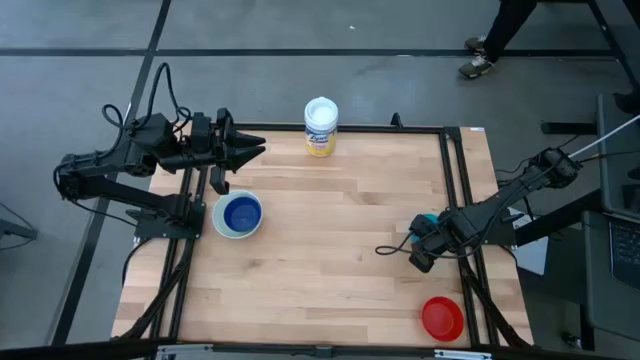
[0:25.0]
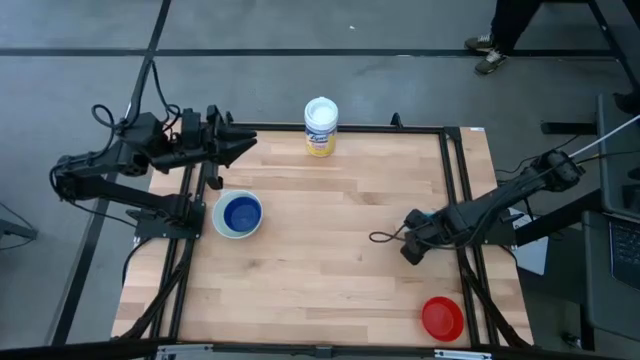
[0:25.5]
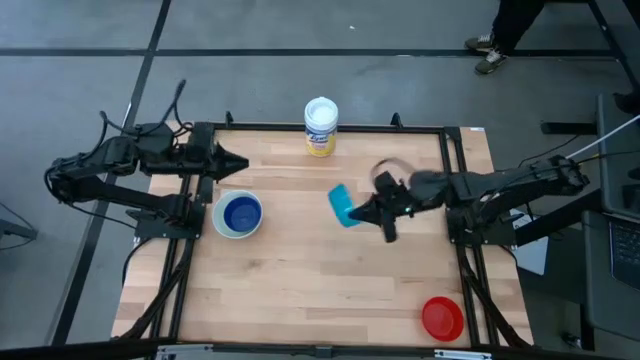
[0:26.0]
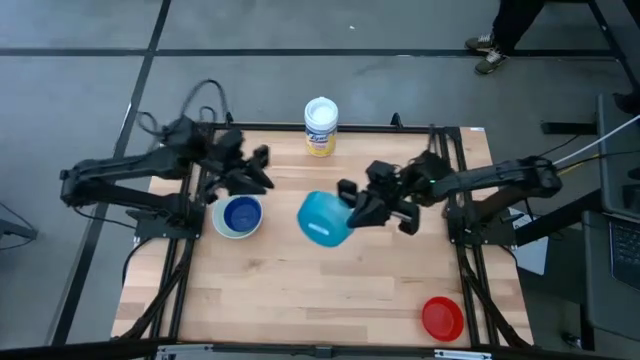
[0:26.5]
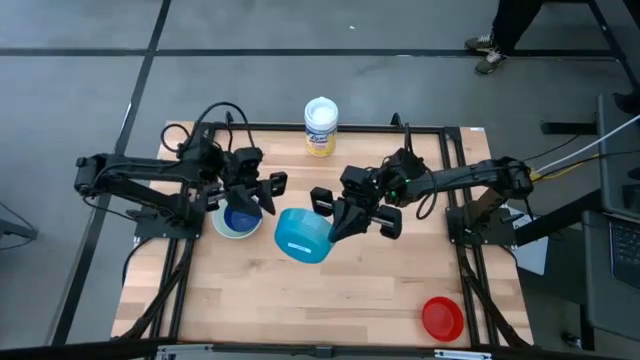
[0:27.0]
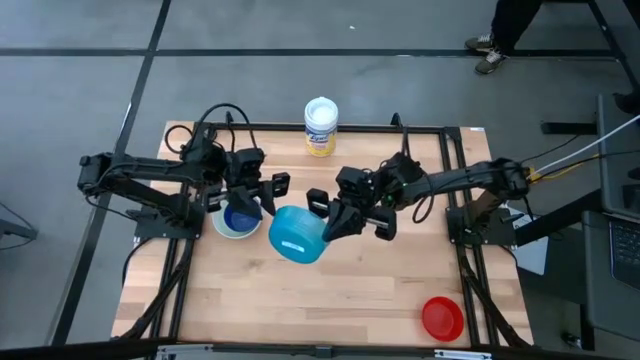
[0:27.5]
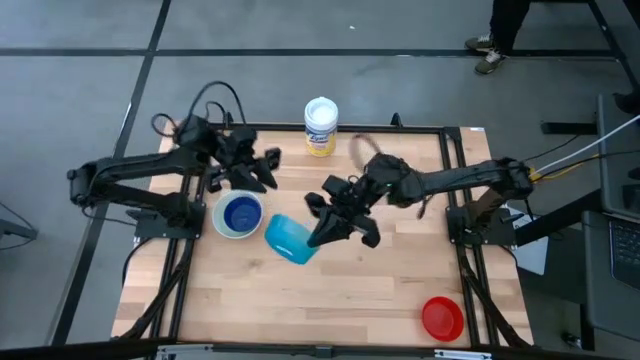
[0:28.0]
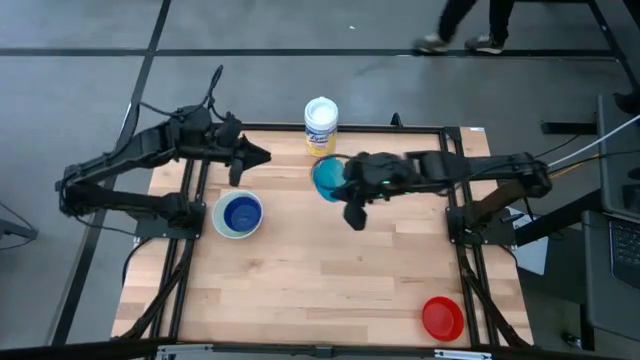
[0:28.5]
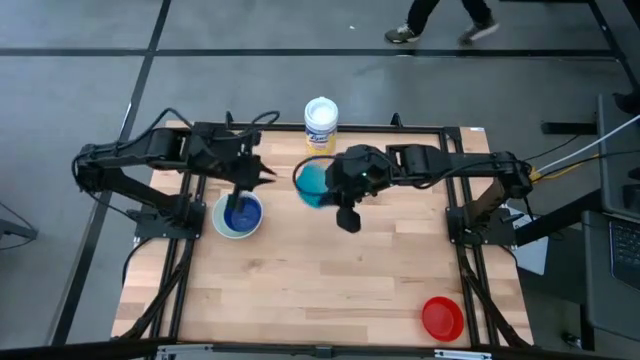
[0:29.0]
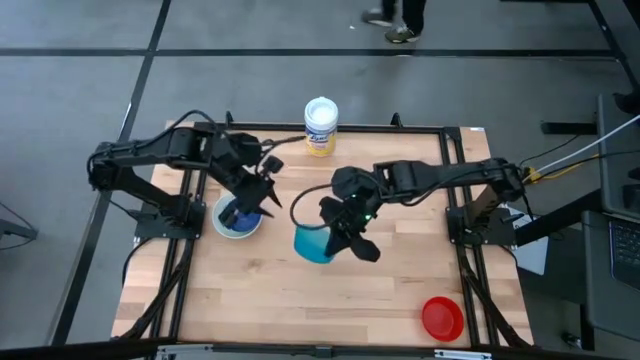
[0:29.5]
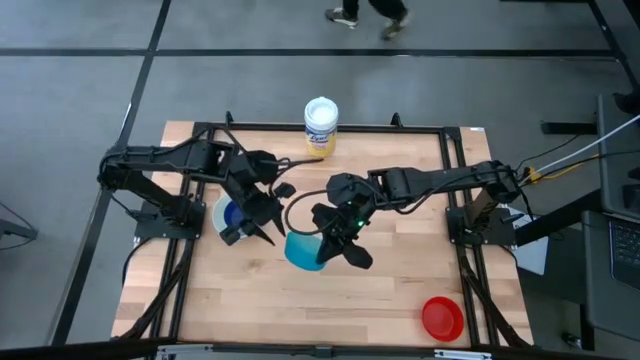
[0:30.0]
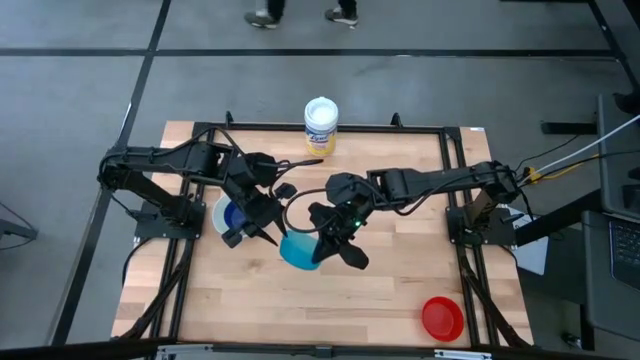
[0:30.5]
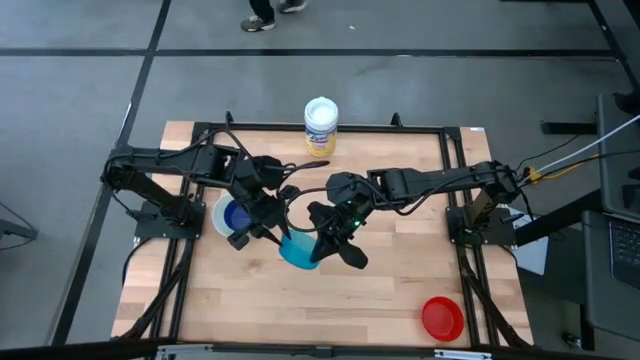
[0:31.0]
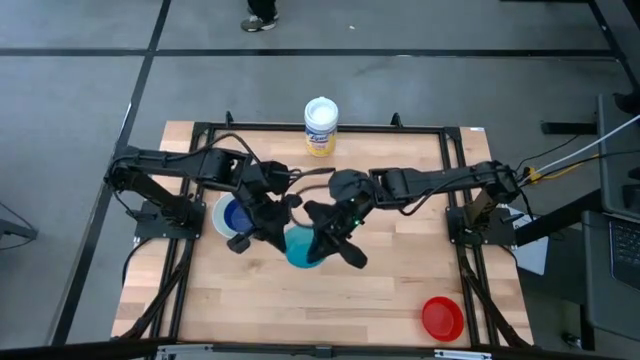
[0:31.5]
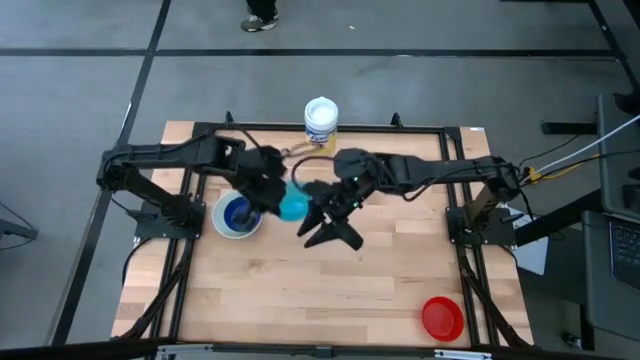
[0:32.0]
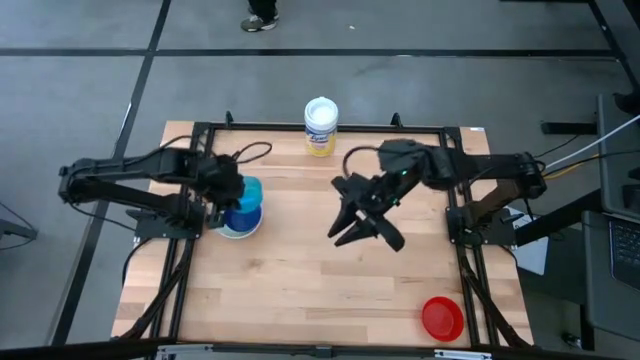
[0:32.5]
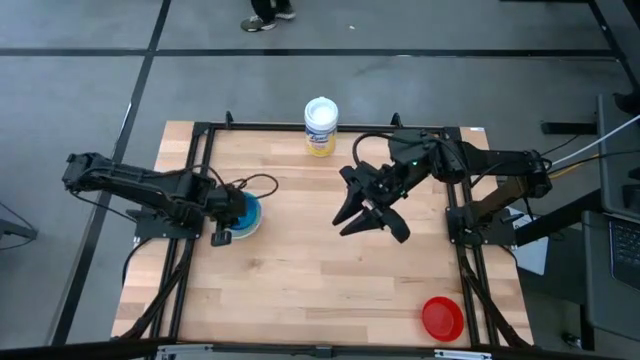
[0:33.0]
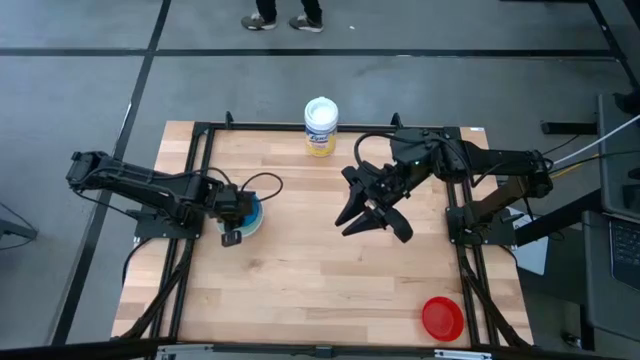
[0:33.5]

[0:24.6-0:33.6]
Stack the light blue bowl on top of the blue bowl

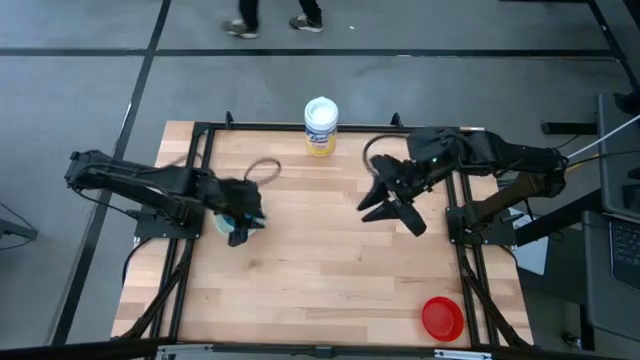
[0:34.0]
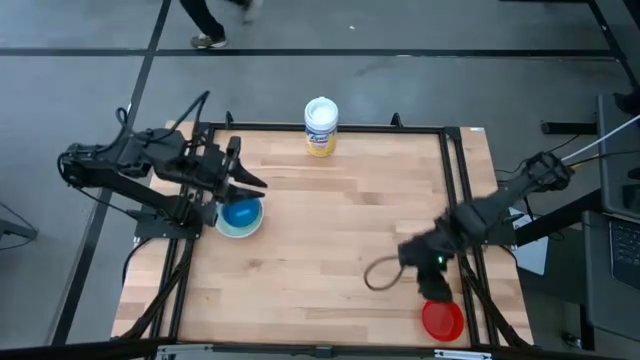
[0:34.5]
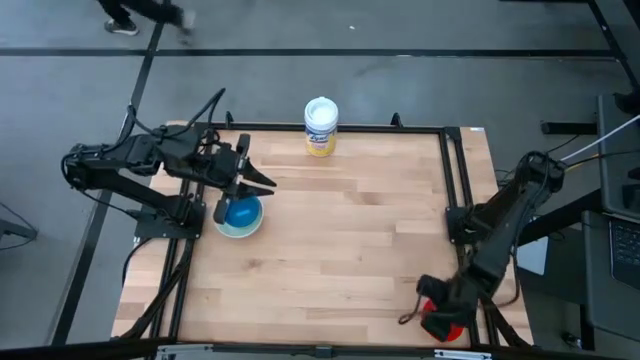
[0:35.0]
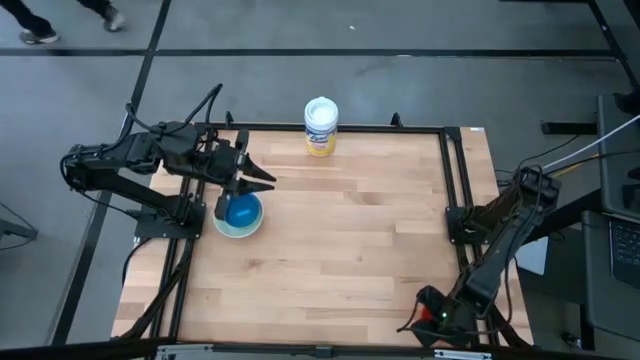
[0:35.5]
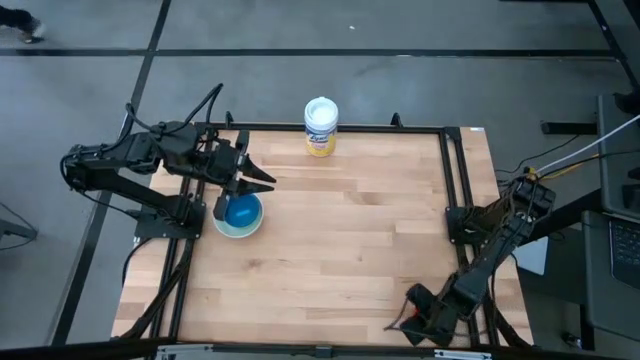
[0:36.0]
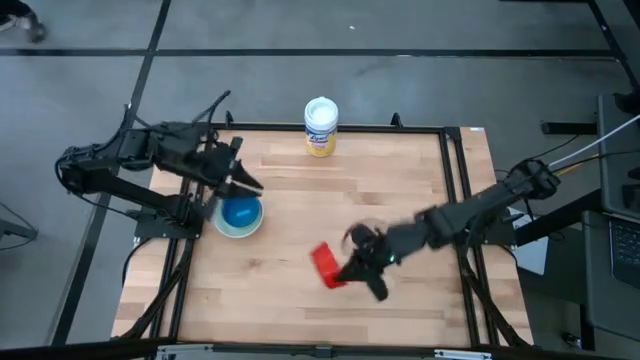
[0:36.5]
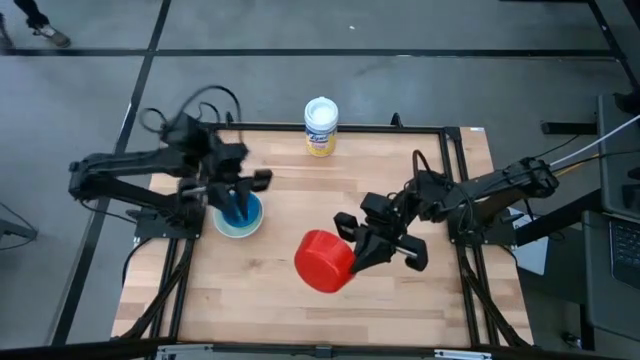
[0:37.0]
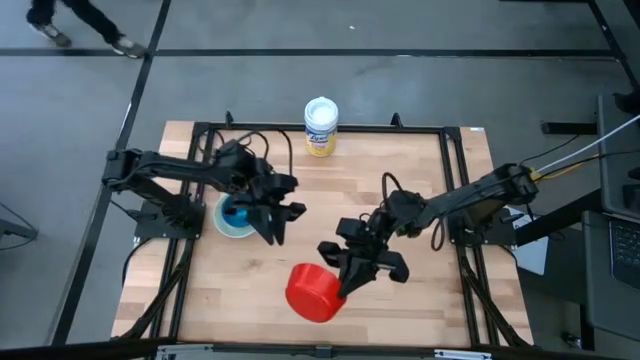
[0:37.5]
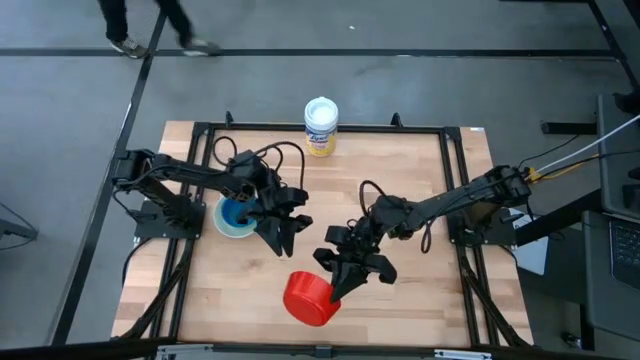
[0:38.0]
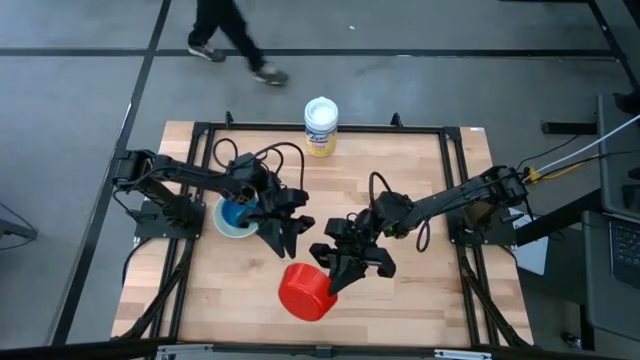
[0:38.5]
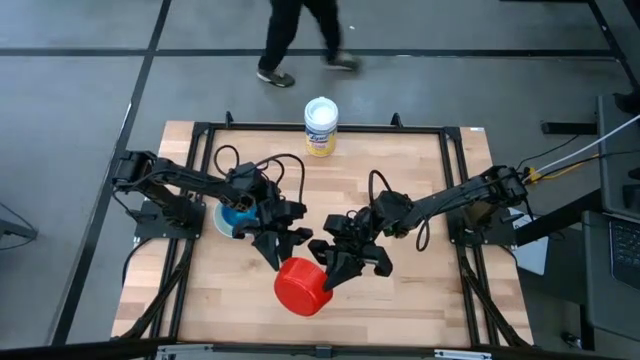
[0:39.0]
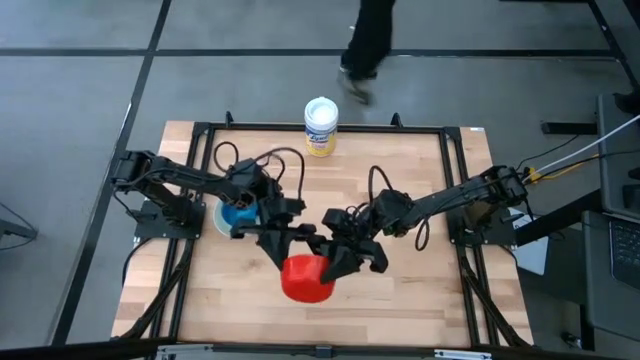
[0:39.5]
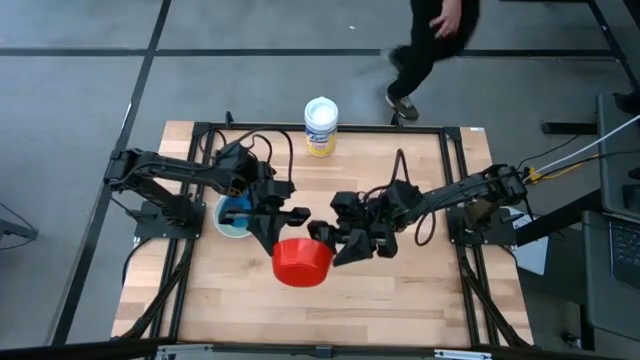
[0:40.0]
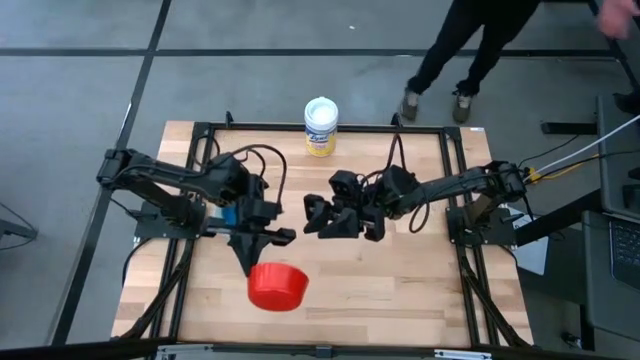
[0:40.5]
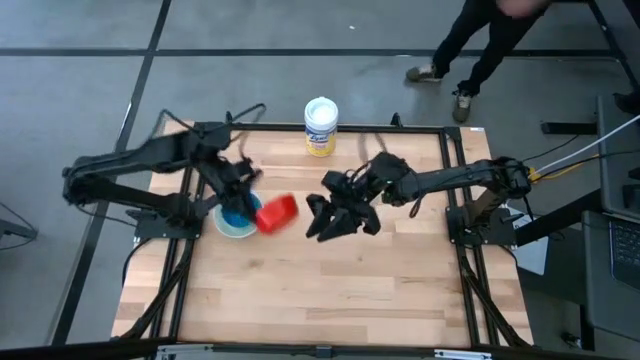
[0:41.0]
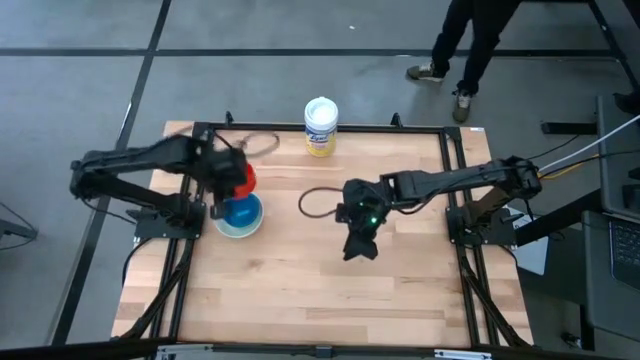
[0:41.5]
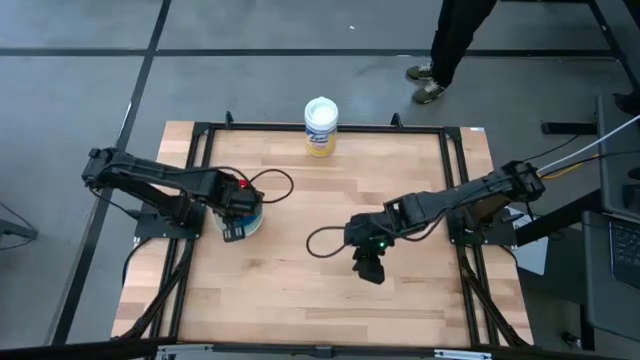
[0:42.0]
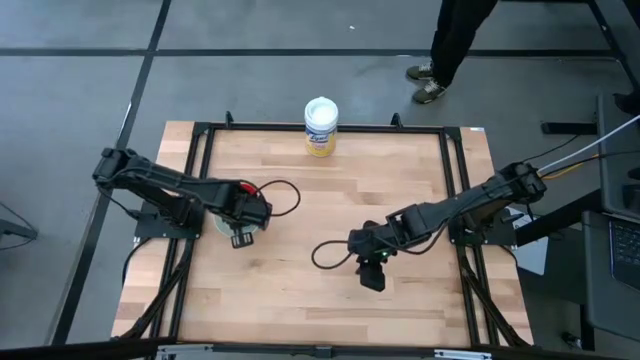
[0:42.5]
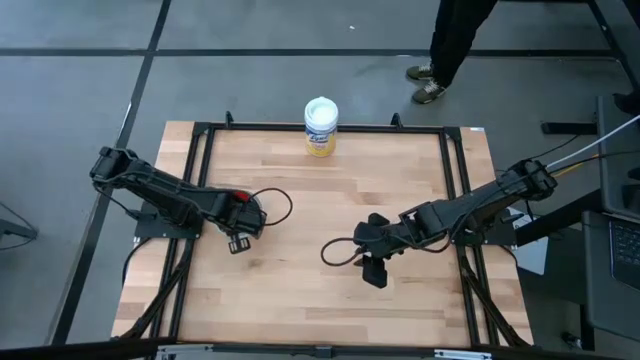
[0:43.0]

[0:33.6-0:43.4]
Stack the red bowl on top of the light blue bowl

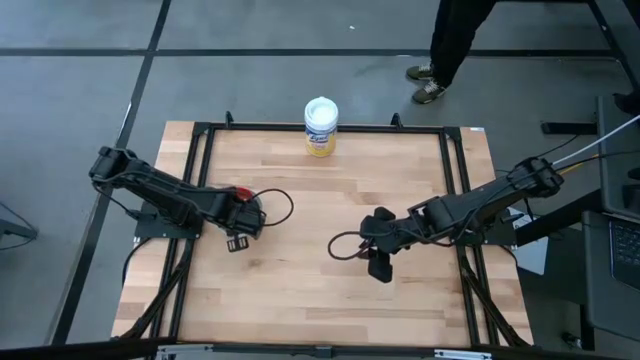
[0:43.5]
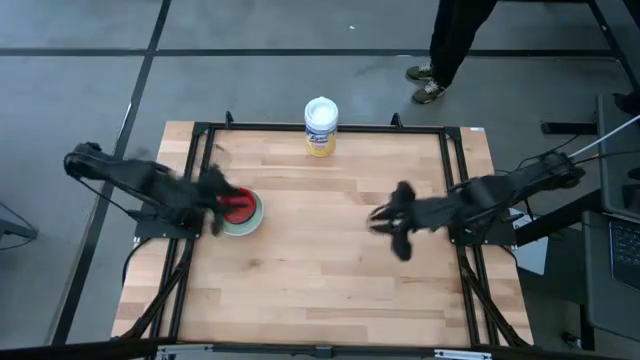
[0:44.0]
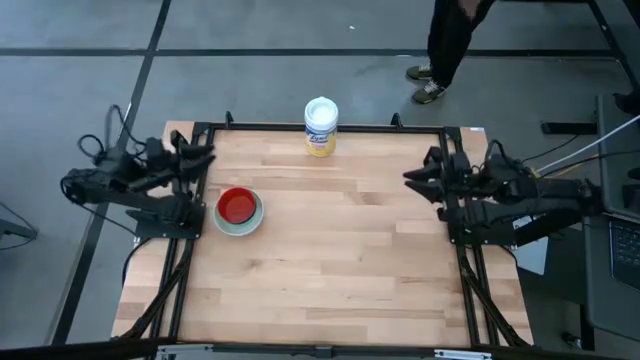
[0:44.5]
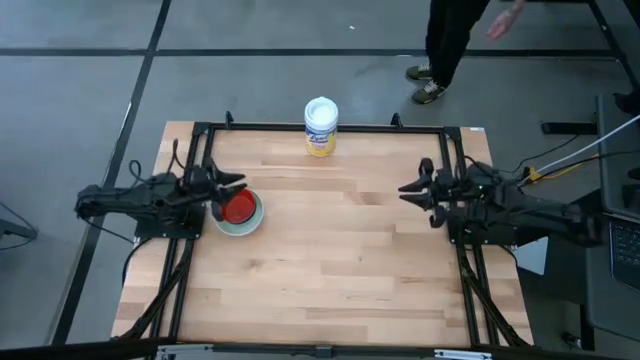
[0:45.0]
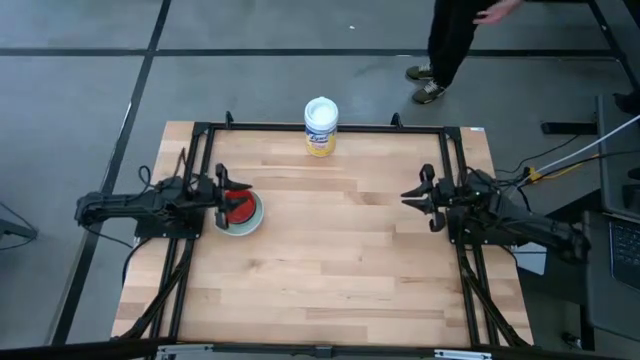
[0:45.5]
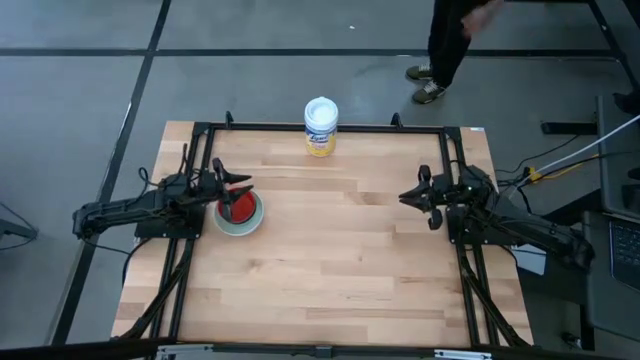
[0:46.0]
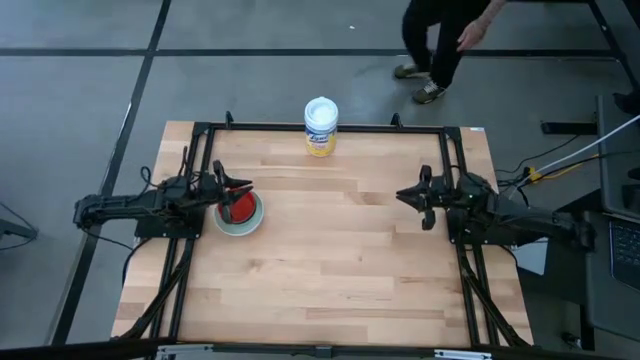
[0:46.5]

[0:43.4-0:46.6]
Return to Home Position
